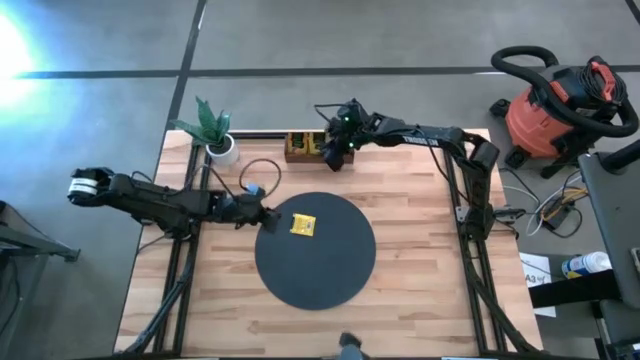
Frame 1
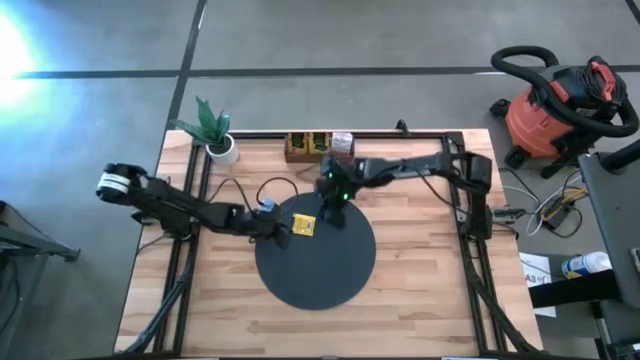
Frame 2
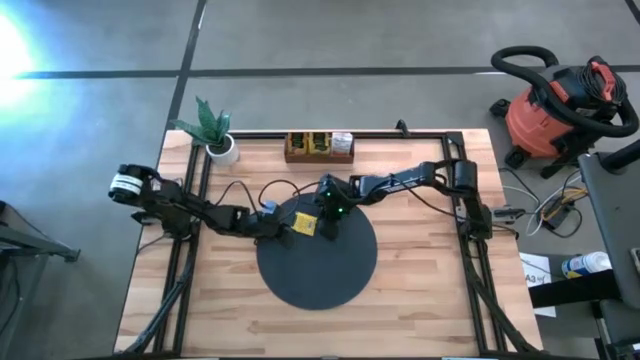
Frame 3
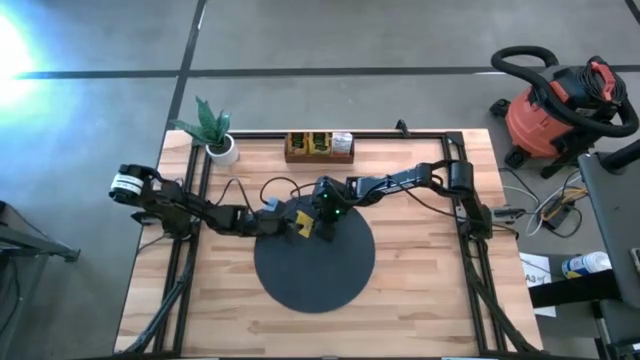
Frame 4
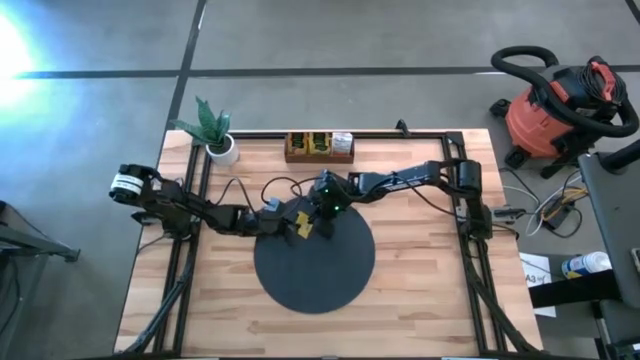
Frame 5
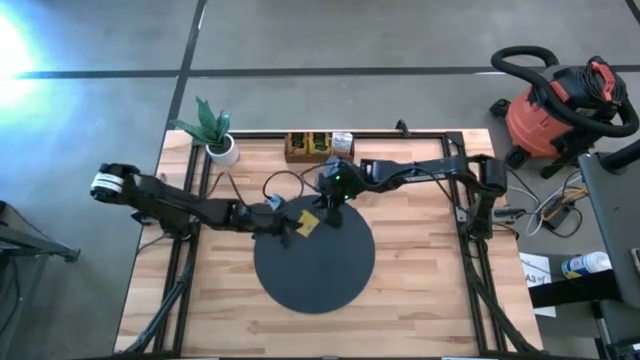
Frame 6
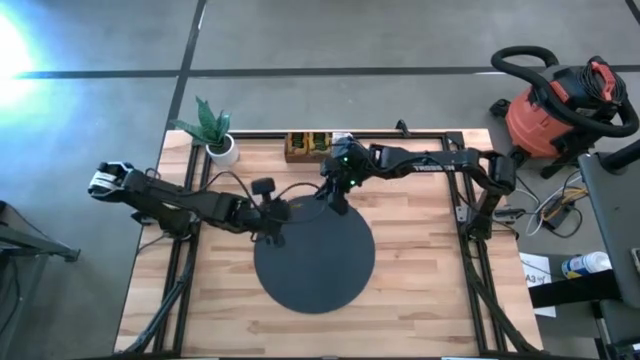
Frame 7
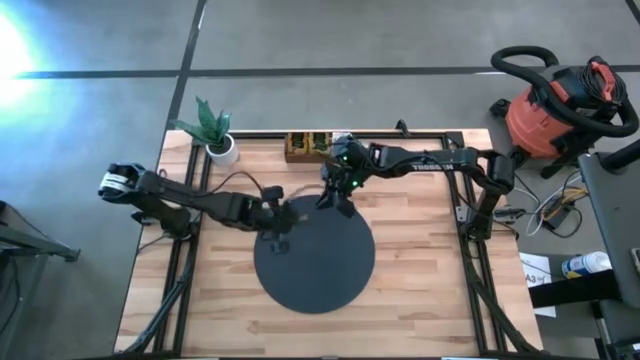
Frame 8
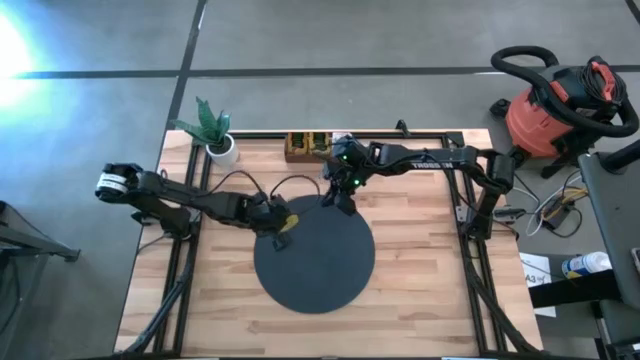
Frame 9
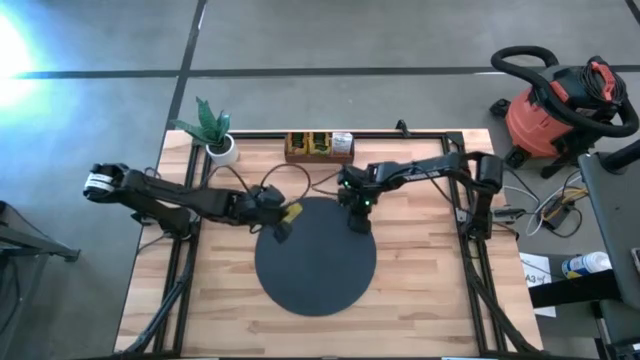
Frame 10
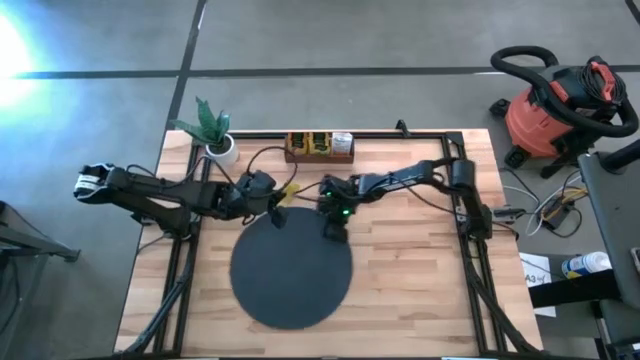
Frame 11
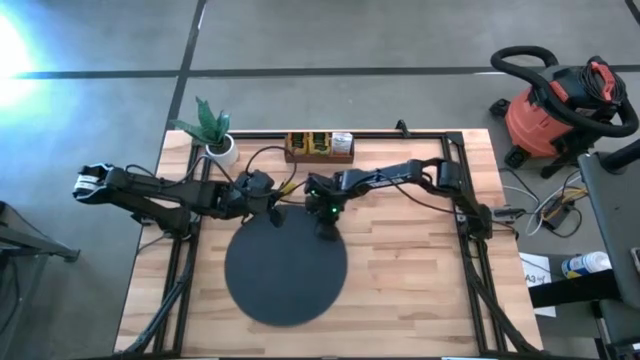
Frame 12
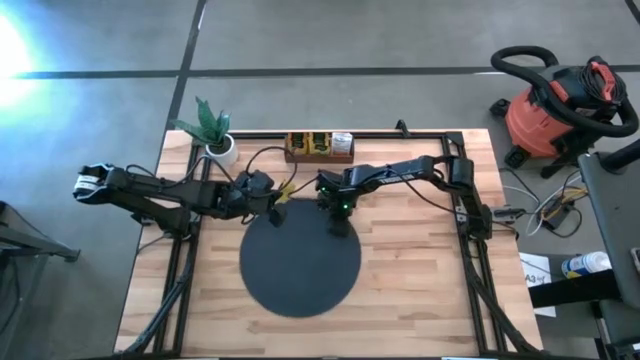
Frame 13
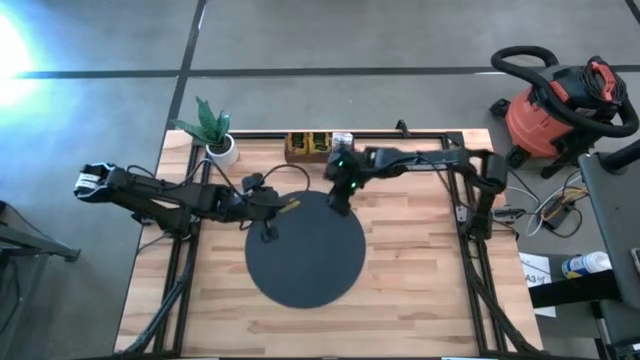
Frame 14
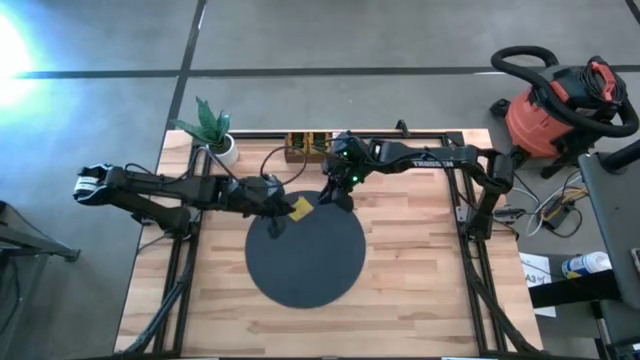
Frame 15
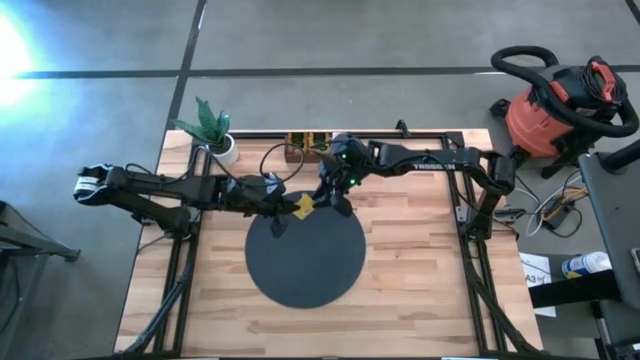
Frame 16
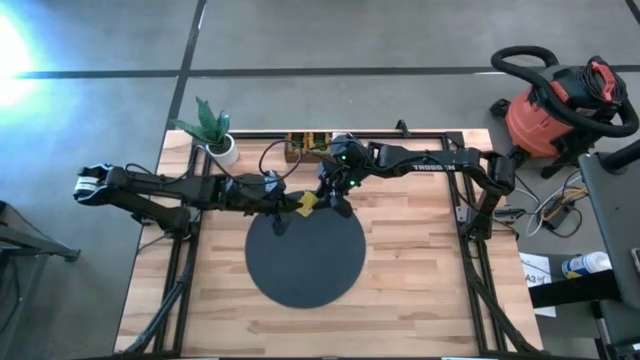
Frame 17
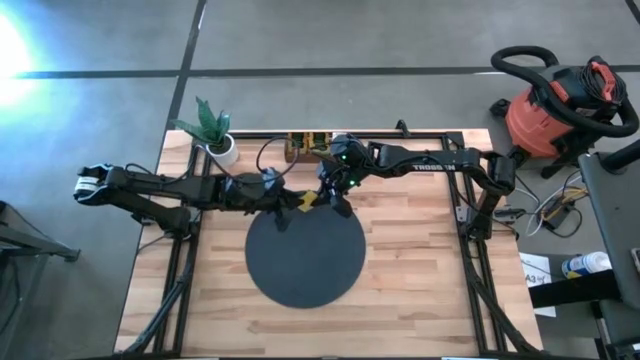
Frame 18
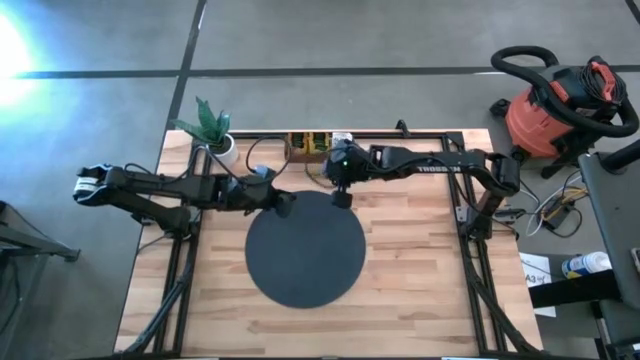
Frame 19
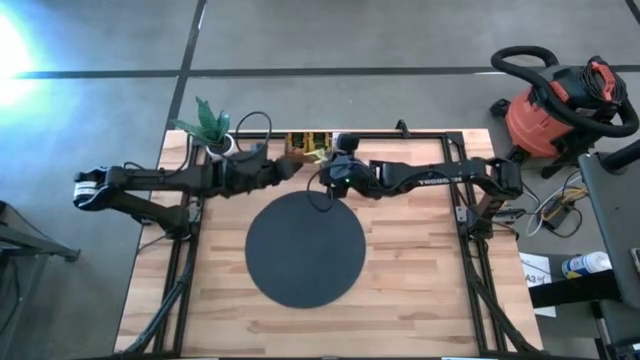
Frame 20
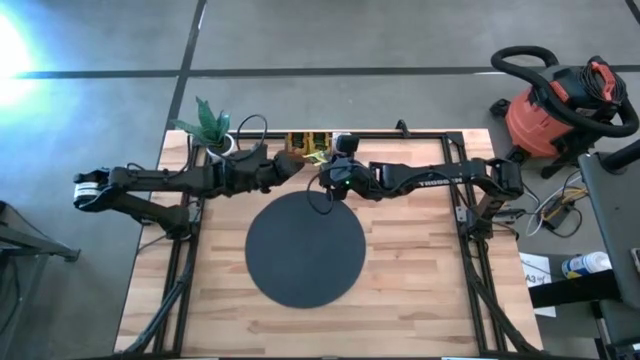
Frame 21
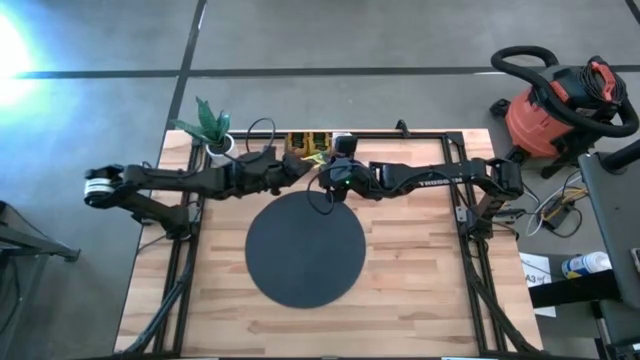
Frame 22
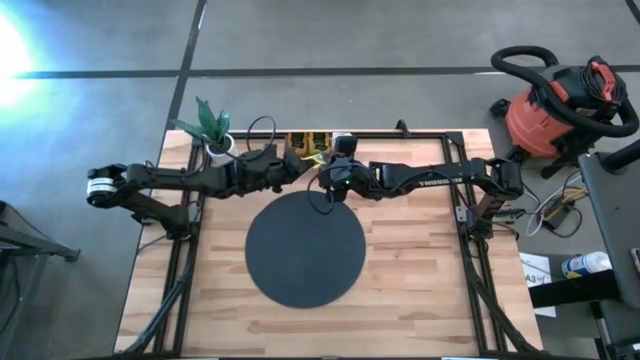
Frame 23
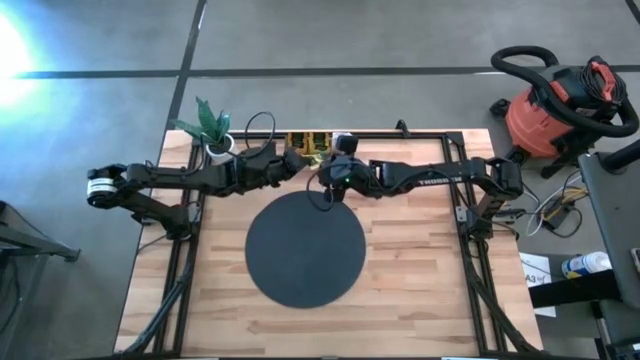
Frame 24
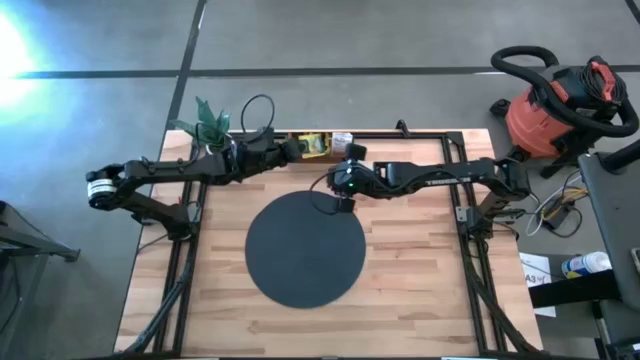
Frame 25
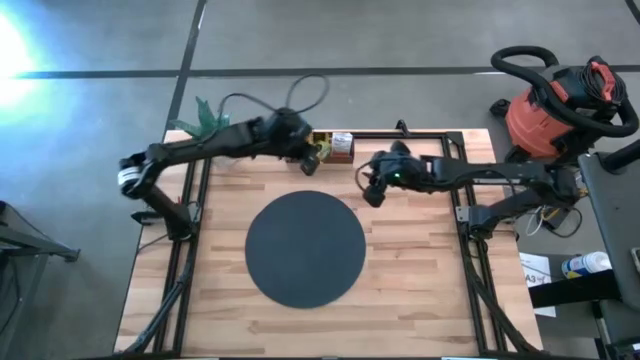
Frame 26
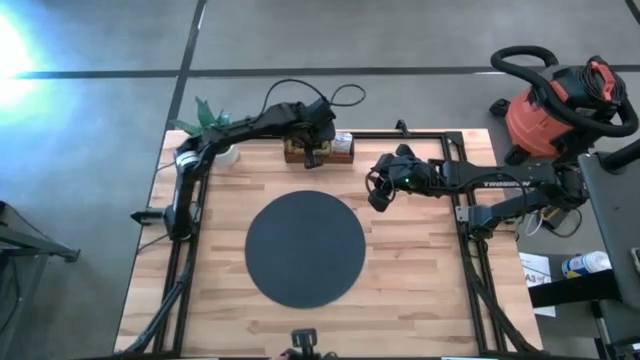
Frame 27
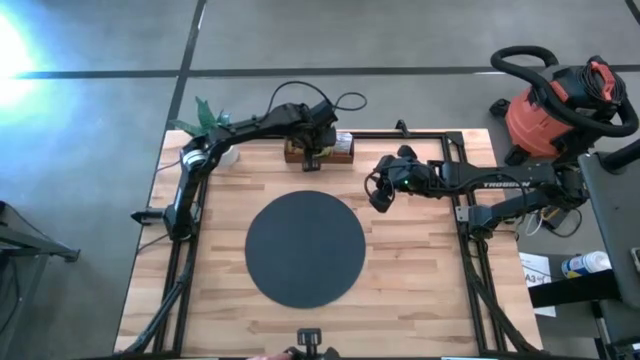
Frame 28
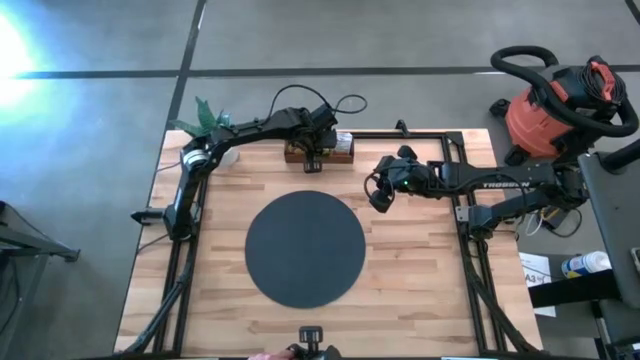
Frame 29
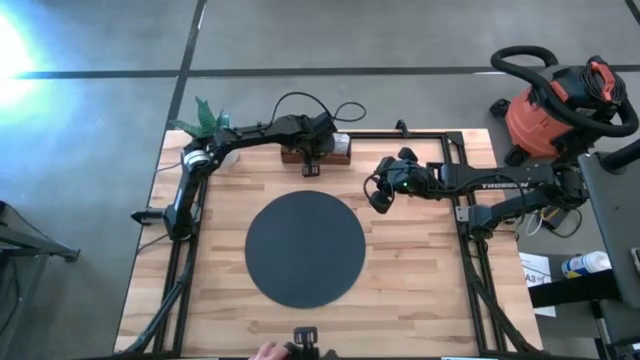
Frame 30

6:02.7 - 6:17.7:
Task: Pick & Place Tea
Put the yellow tea bag into the middle section of the wooden organizer

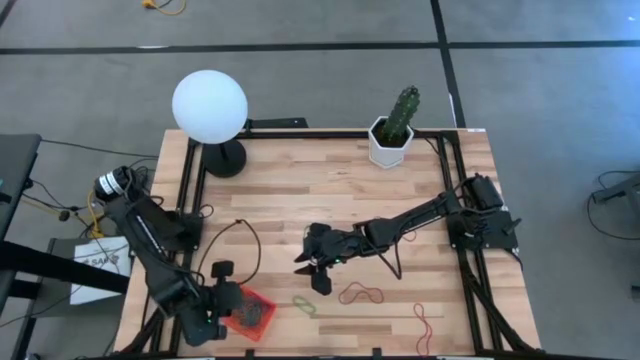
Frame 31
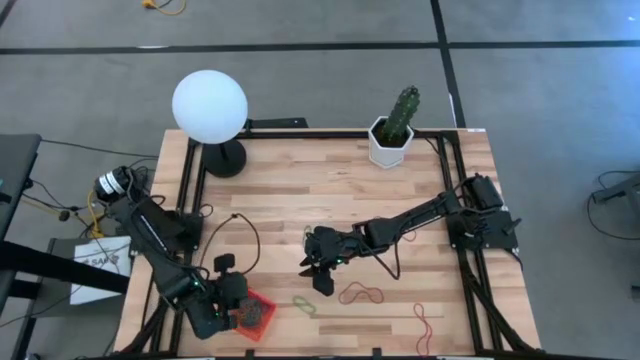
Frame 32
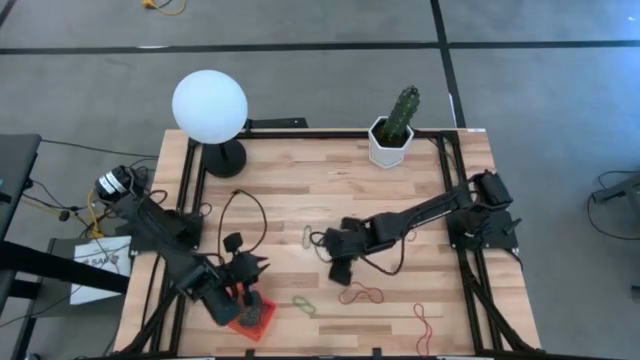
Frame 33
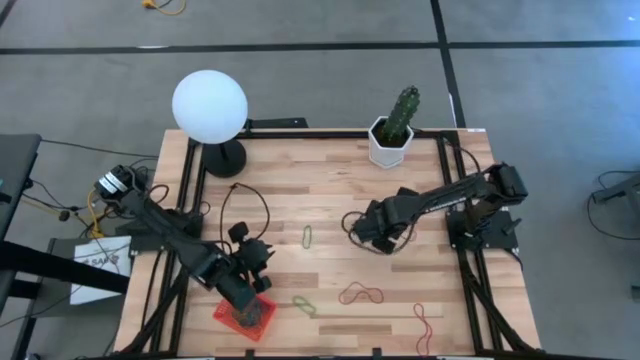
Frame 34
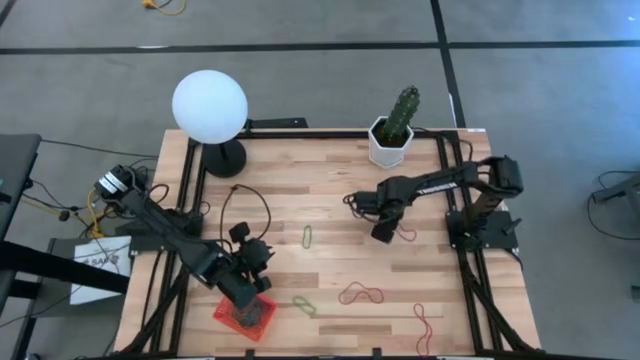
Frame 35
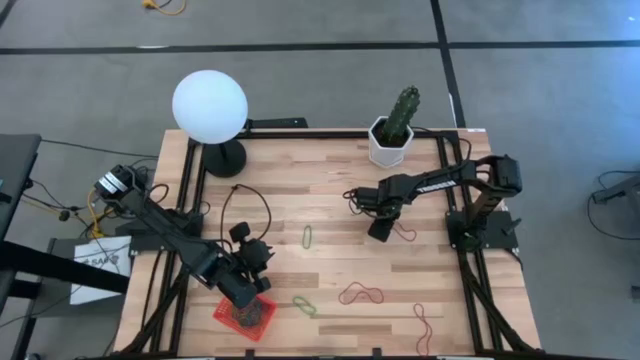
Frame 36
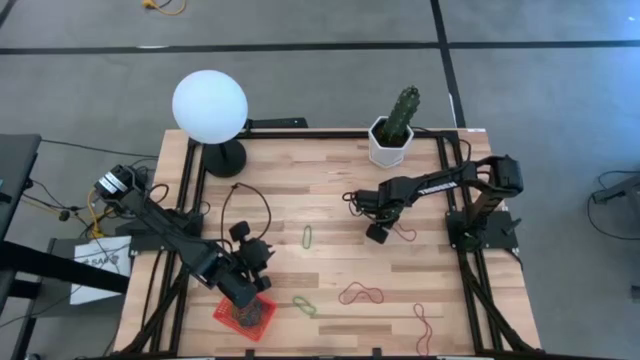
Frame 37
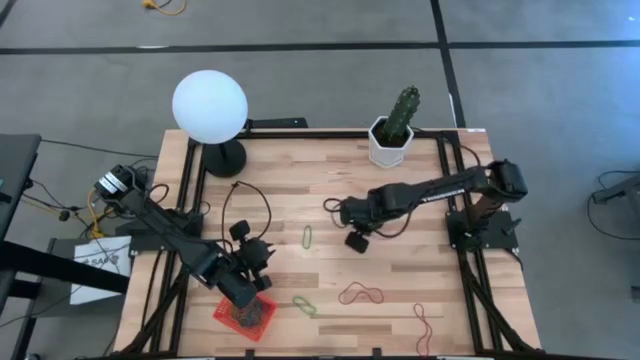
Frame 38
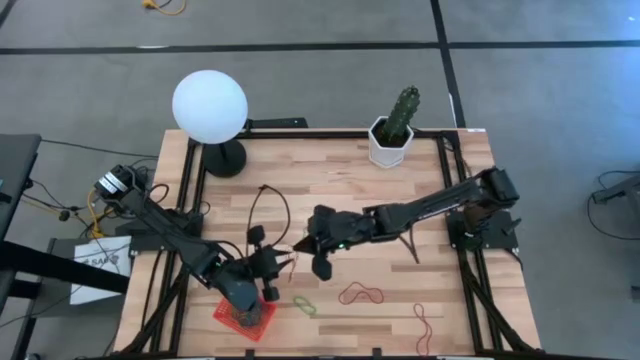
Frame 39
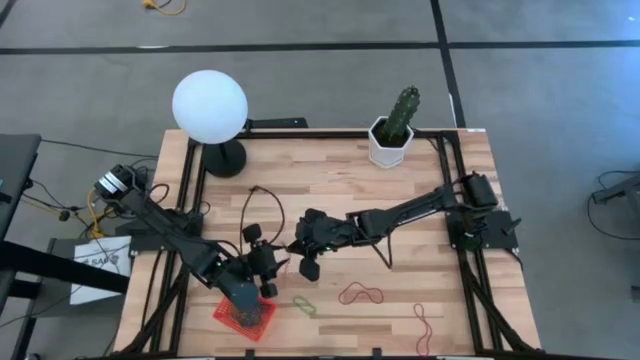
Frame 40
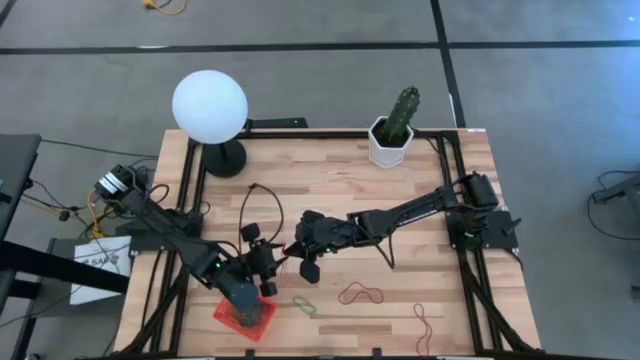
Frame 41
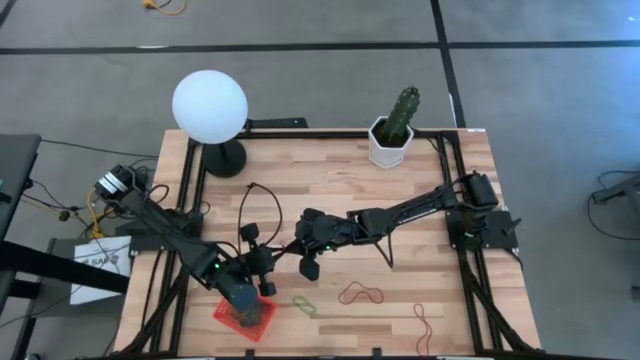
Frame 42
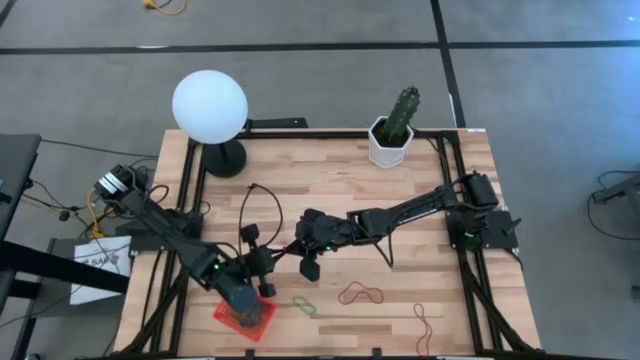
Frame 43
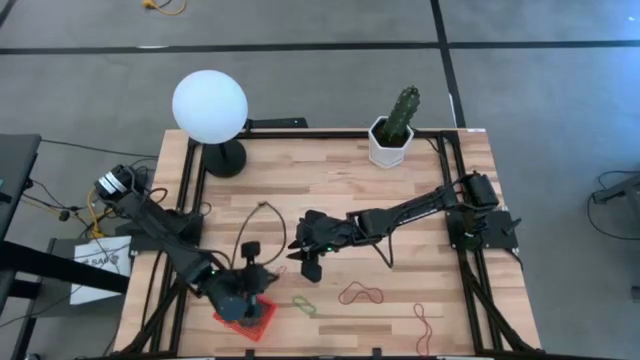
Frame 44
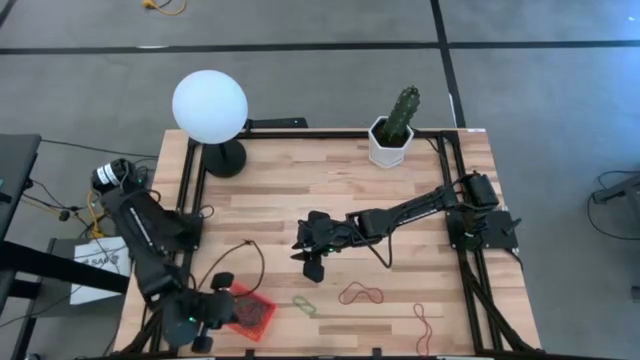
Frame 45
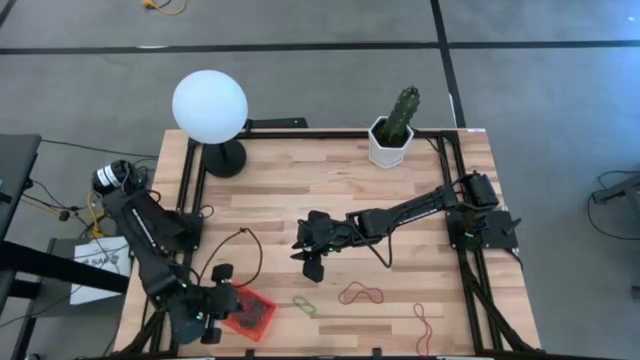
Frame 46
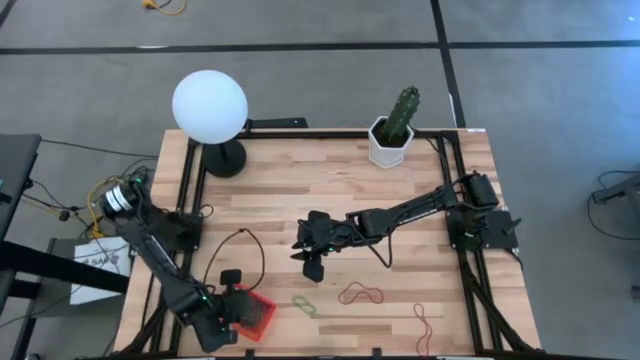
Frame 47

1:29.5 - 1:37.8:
Task: Pick and place rubber bands into bin
Put the top red rubber band into the basket
